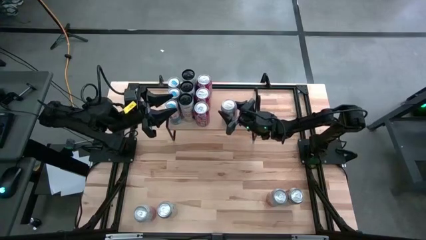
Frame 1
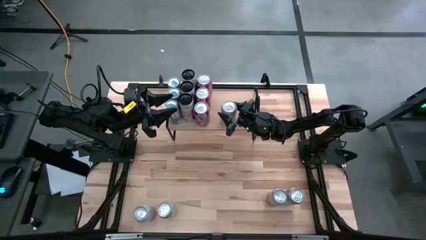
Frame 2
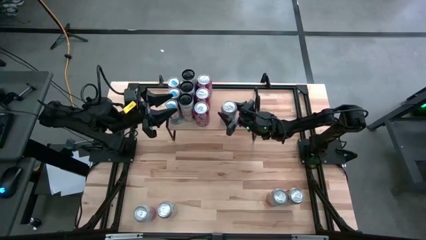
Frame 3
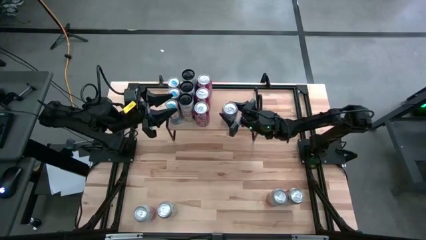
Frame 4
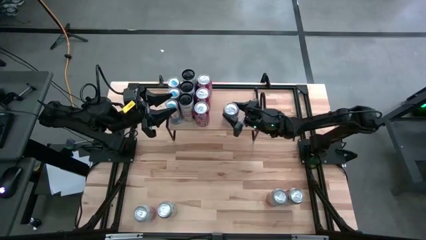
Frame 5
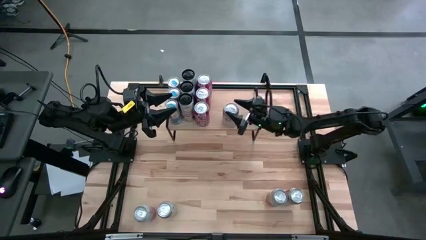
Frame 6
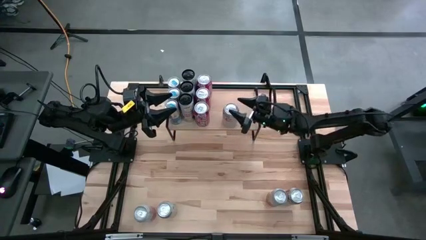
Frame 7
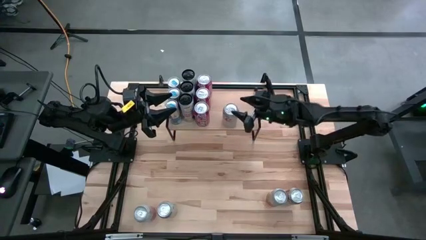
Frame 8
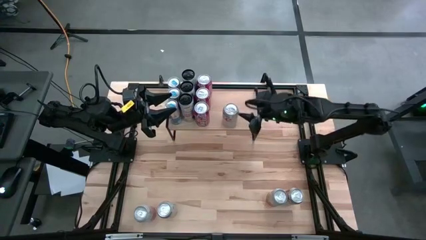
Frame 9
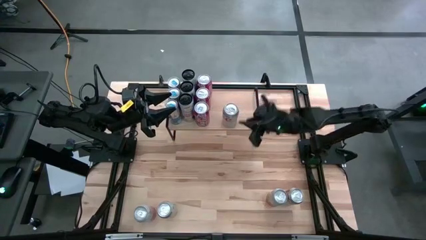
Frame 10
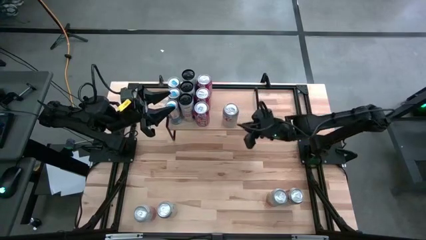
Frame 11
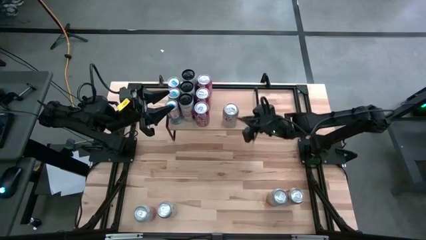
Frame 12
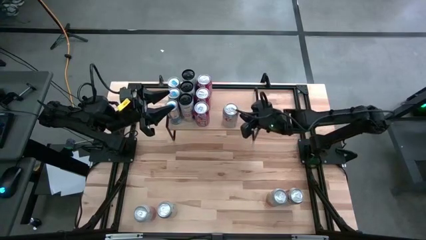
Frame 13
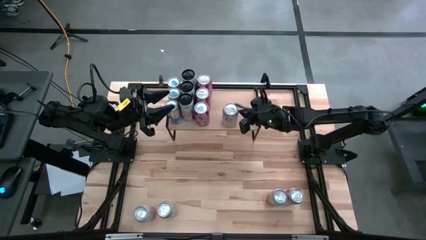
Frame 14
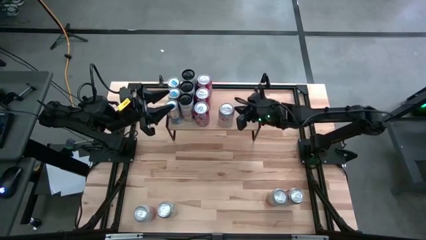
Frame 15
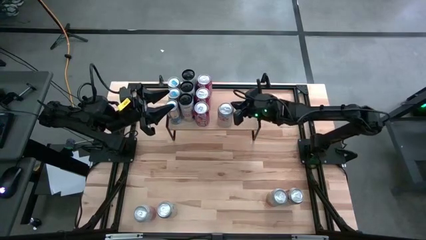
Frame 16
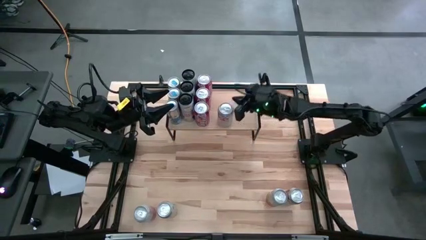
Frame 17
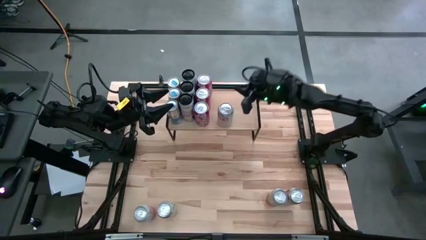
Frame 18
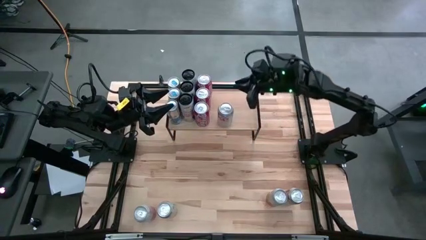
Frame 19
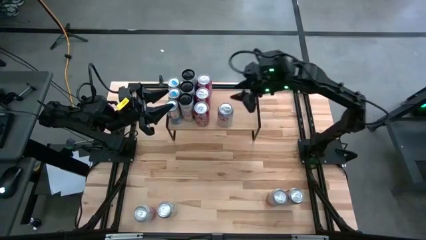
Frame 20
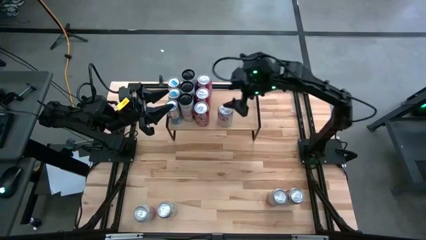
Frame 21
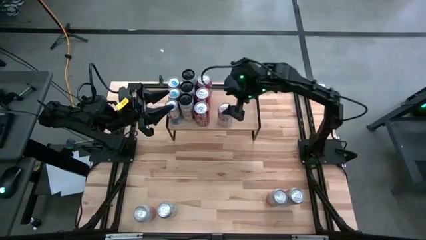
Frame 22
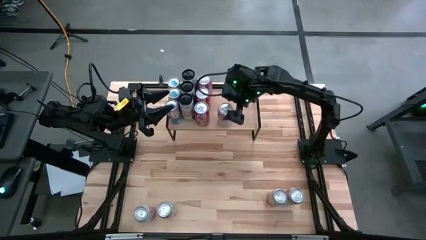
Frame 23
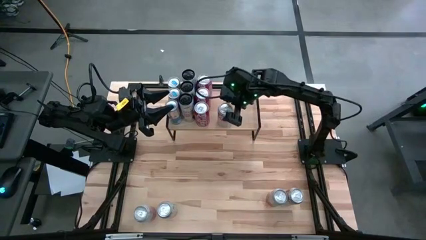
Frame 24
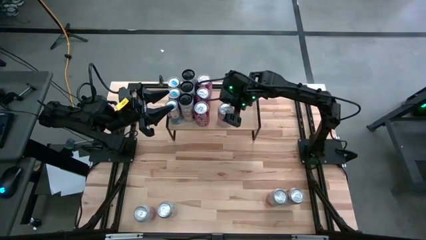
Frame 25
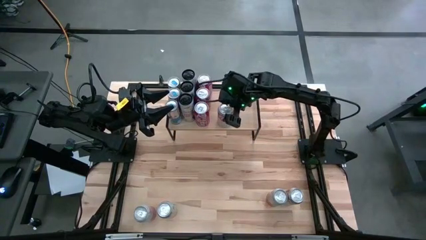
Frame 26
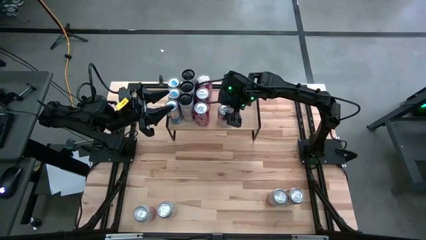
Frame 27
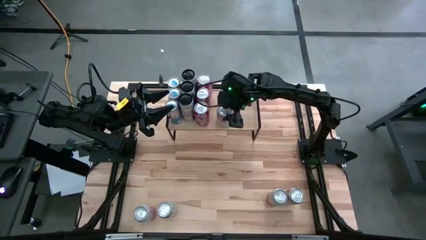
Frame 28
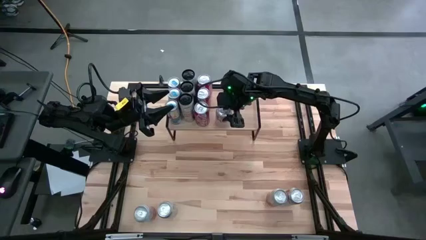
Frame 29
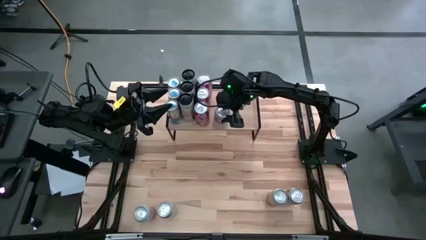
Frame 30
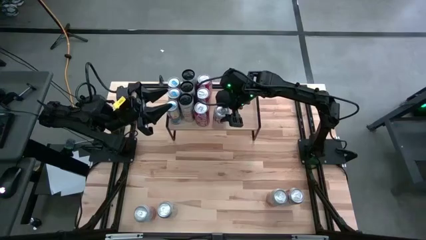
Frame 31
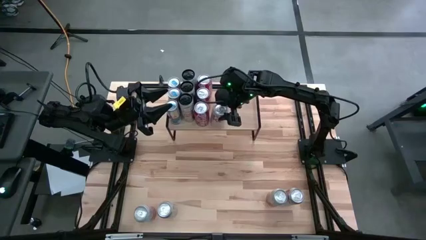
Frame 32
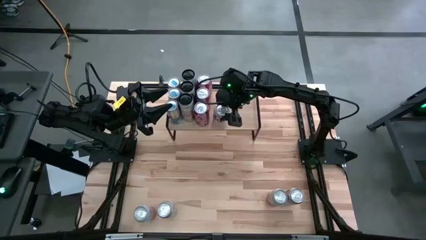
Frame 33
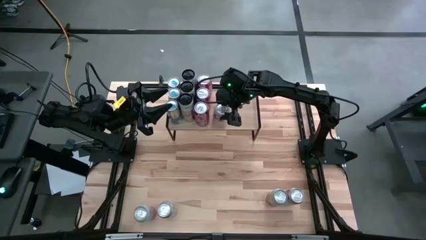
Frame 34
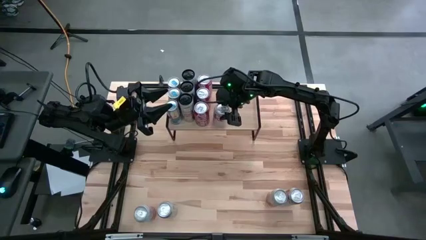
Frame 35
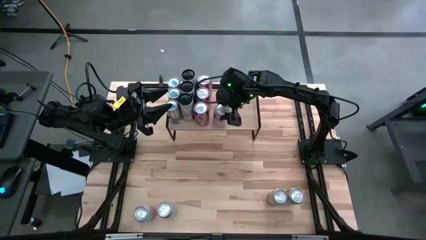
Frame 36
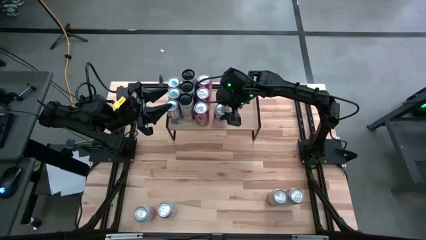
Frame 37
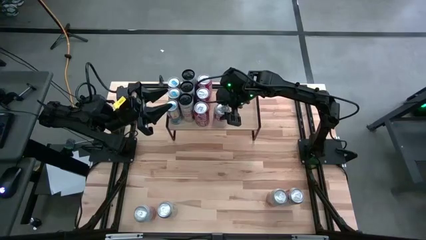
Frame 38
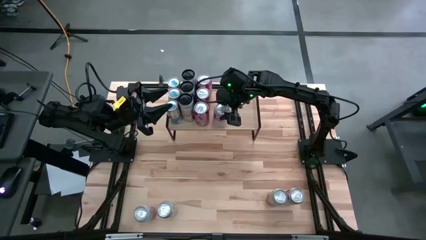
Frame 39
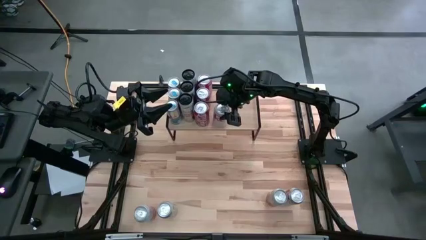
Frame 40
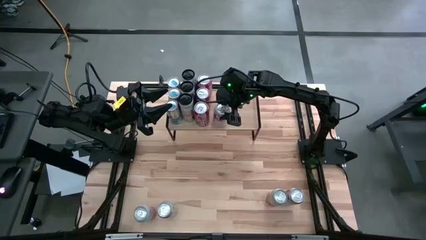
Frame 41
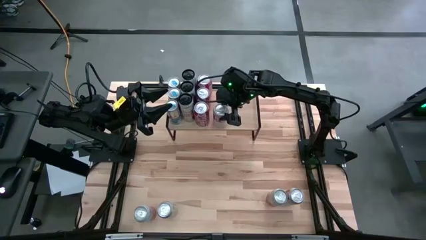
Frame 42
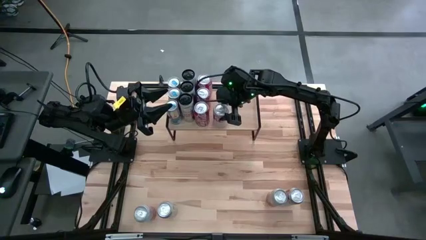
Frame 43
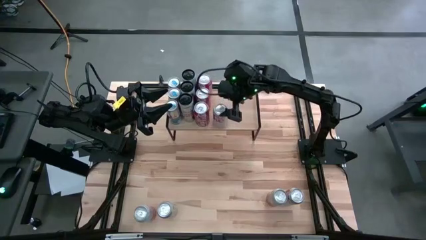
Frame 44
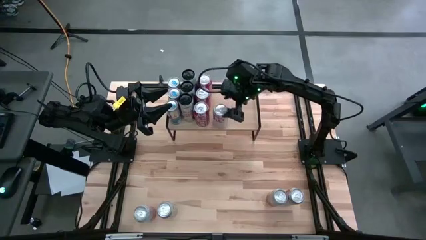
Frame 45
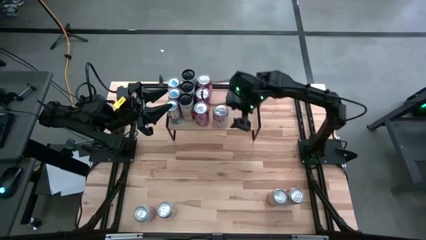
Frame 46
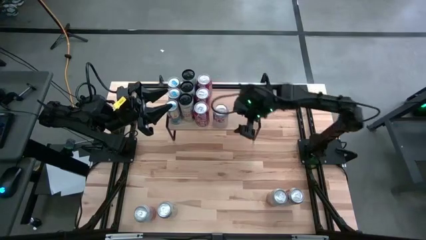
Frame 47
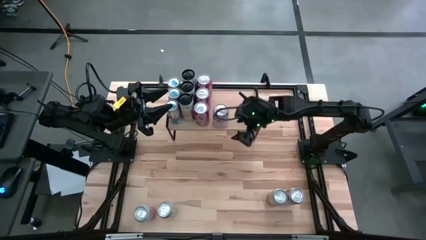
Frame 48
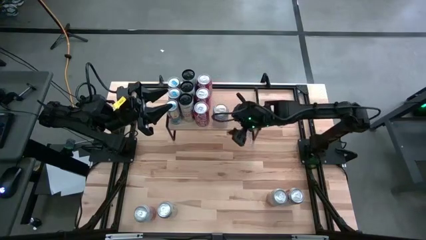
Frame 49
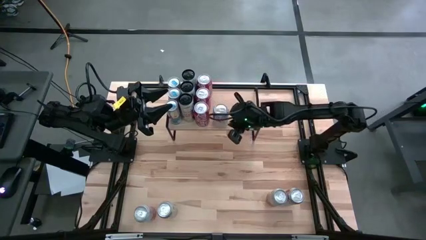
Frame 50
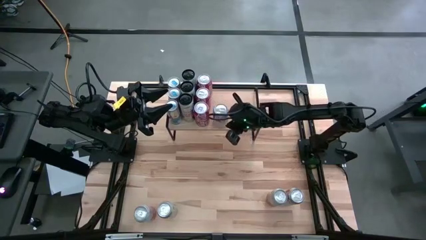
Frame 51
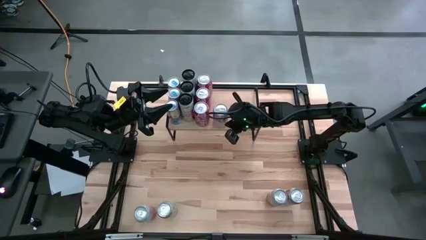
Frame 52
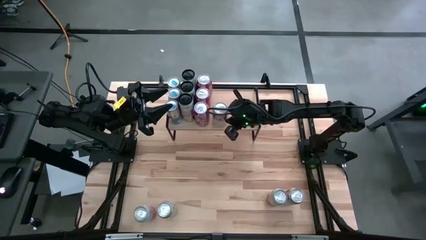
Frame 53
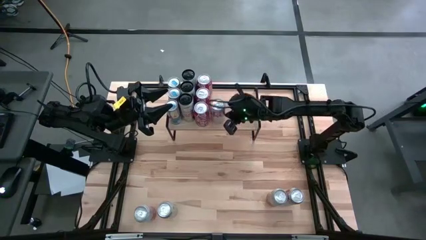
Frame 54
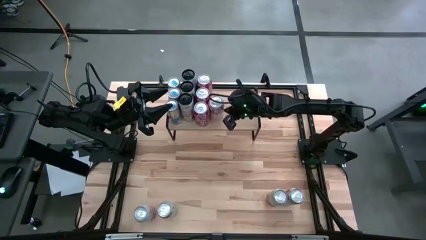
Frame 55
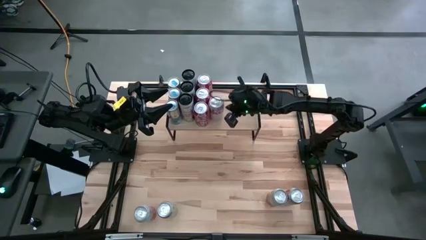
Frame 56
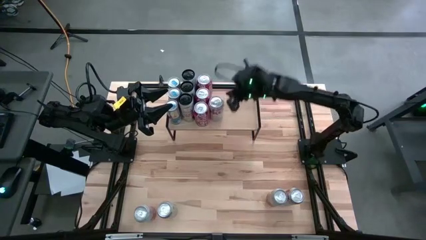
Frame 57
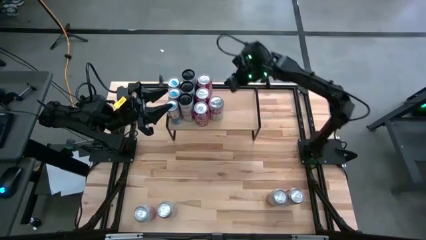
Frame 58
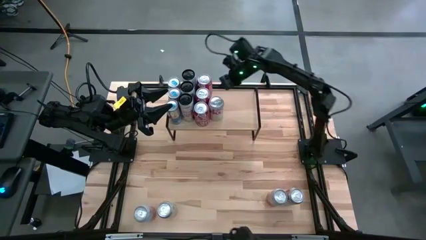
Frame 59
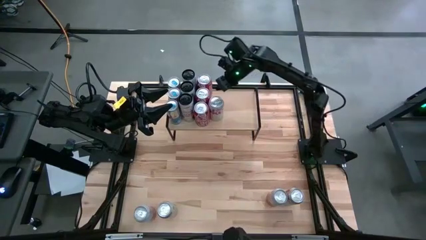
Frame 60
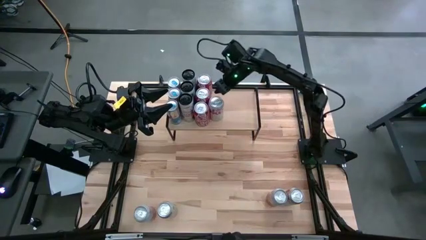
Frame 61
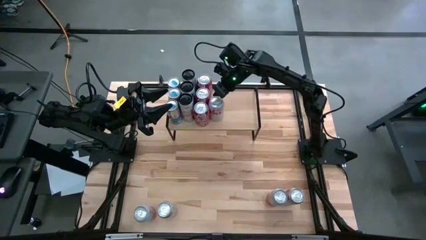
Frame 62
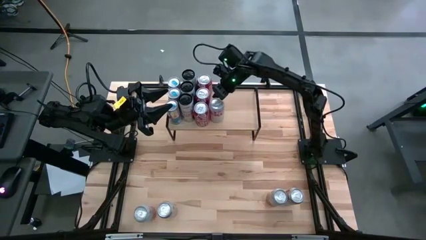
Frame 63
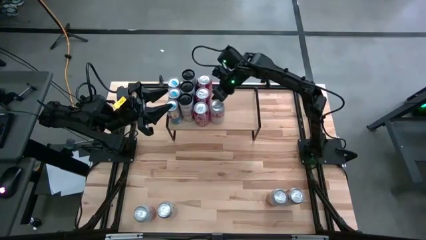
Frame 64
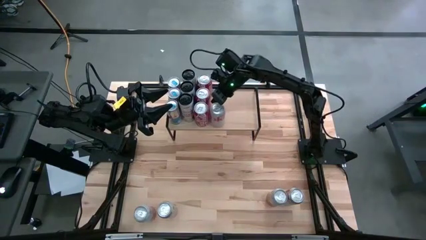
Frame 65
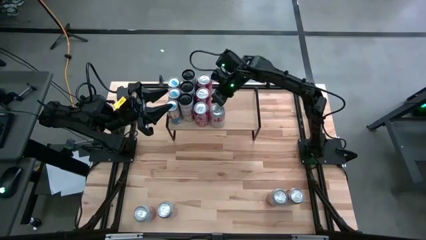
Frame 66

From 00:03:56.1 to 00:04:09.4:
Task: Place canned beverage on shelf
Put the middle red-silver soda can on the shelf
